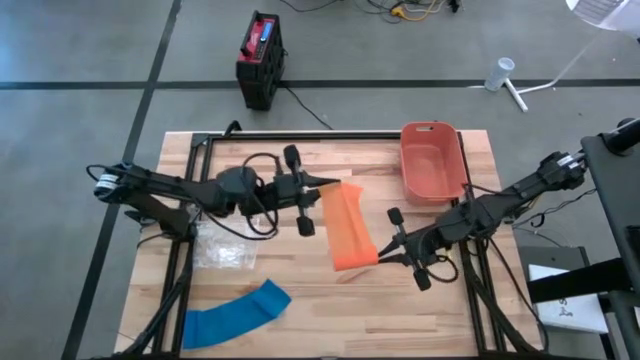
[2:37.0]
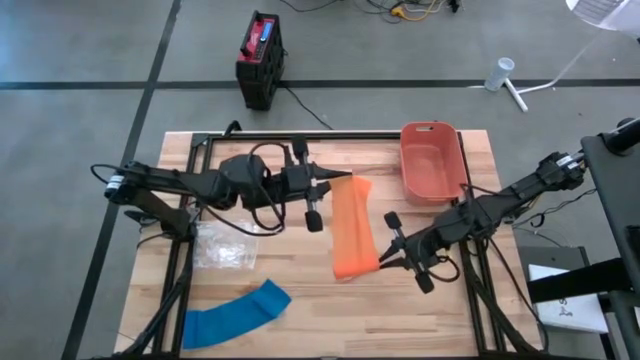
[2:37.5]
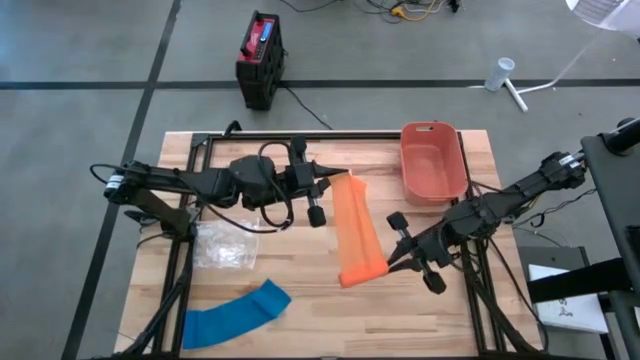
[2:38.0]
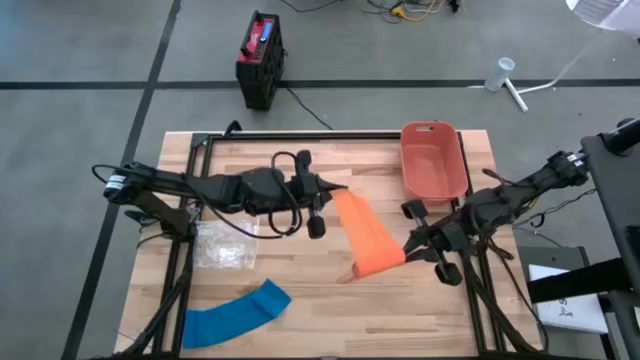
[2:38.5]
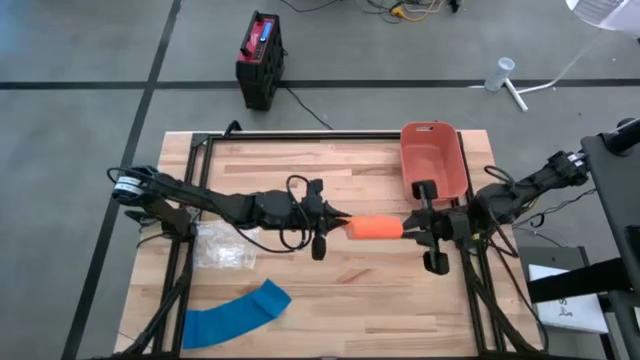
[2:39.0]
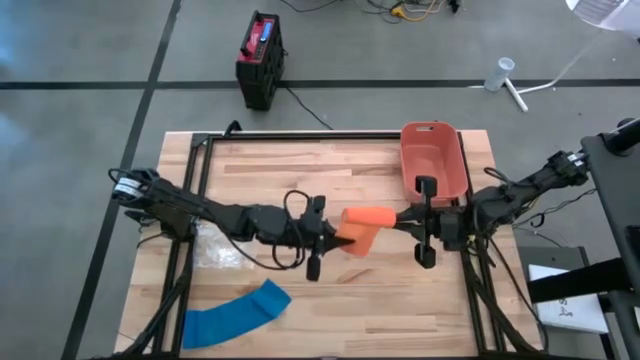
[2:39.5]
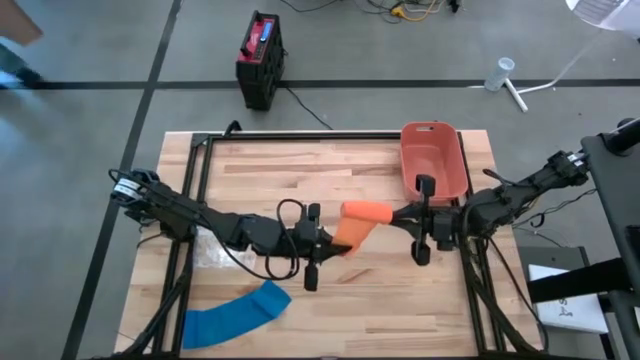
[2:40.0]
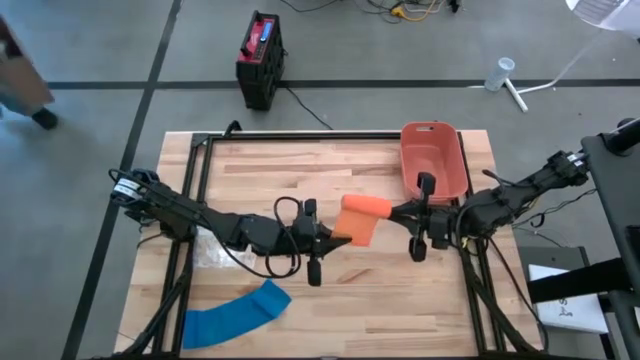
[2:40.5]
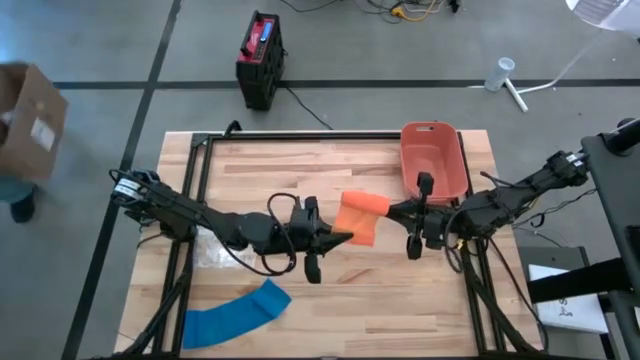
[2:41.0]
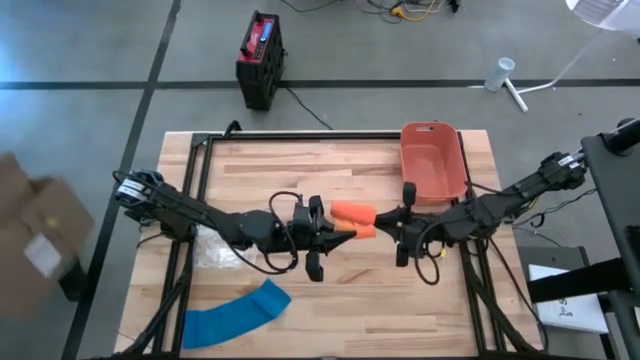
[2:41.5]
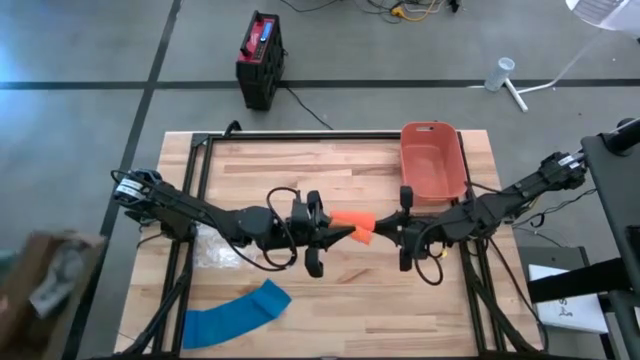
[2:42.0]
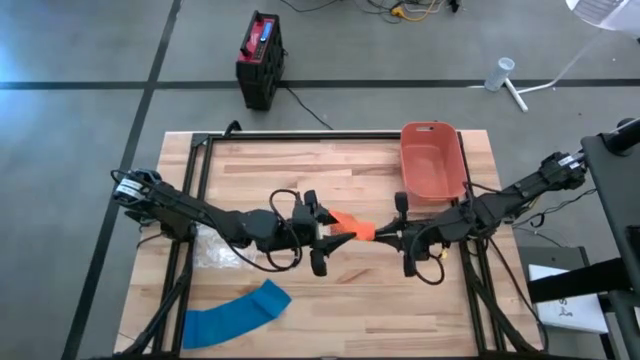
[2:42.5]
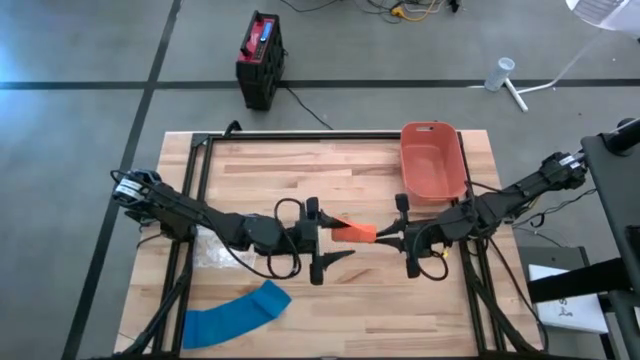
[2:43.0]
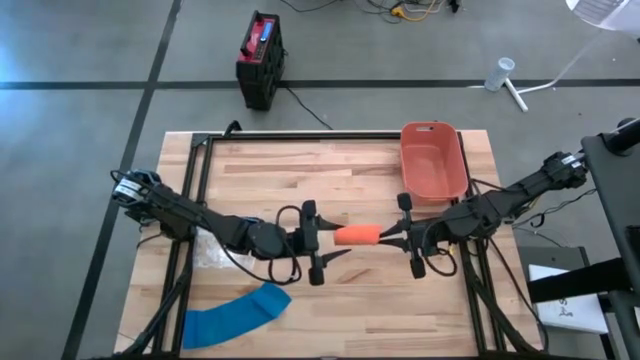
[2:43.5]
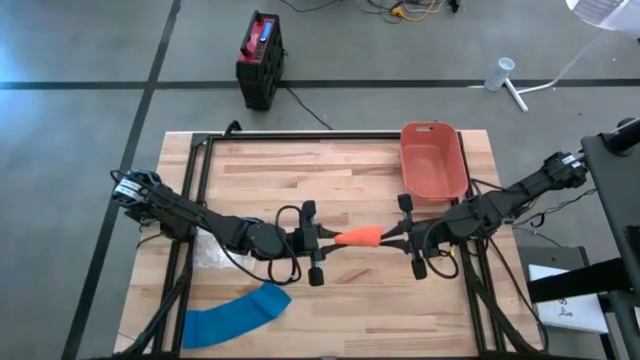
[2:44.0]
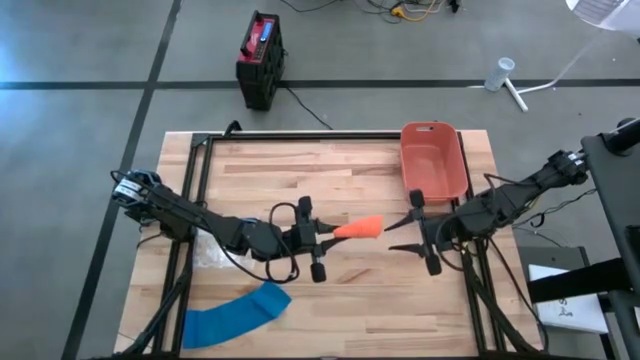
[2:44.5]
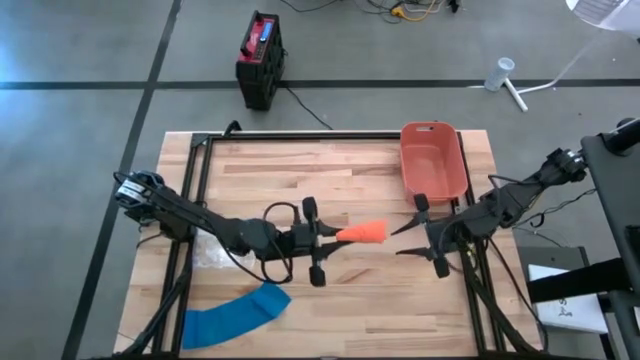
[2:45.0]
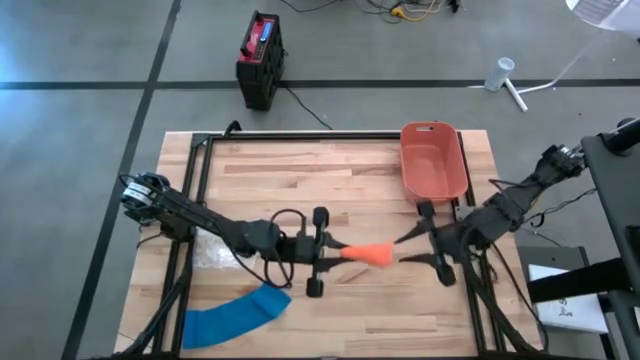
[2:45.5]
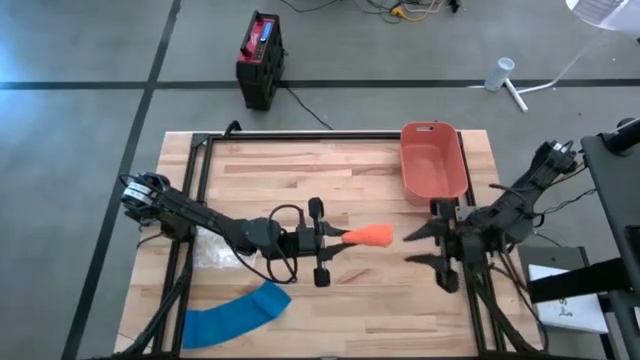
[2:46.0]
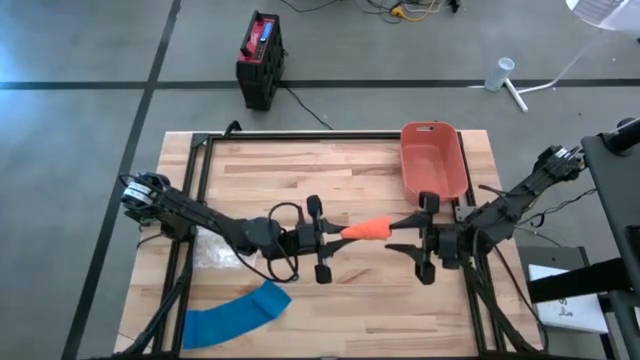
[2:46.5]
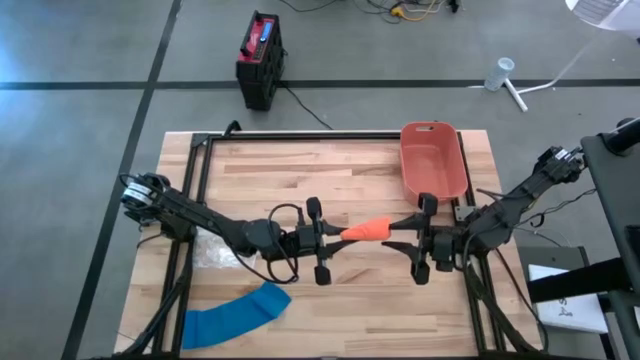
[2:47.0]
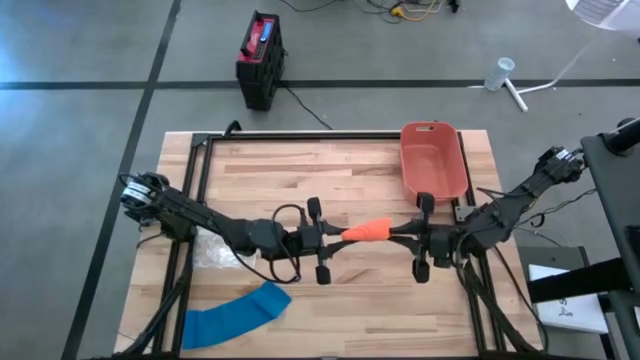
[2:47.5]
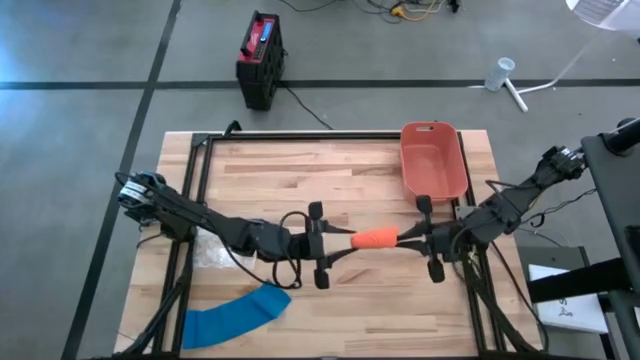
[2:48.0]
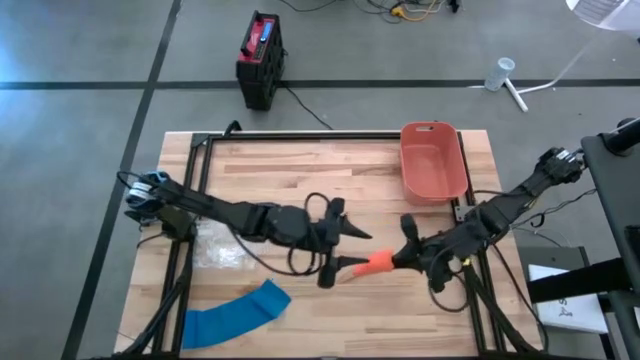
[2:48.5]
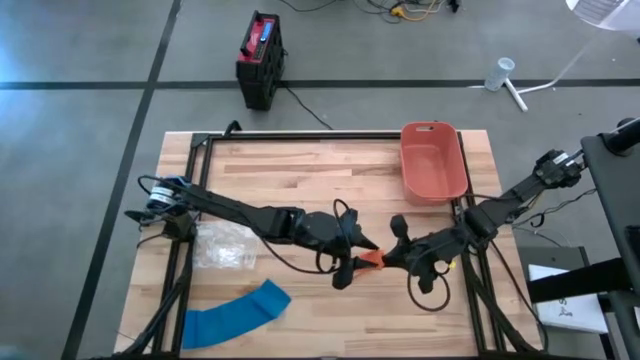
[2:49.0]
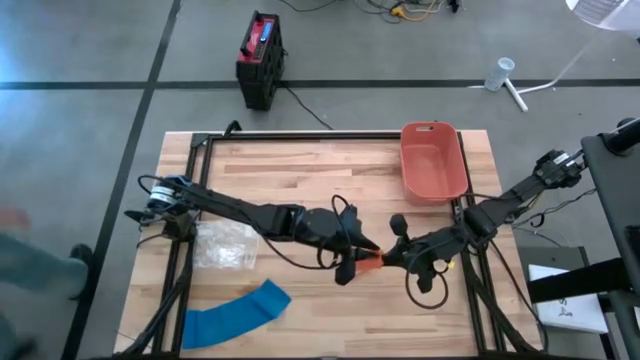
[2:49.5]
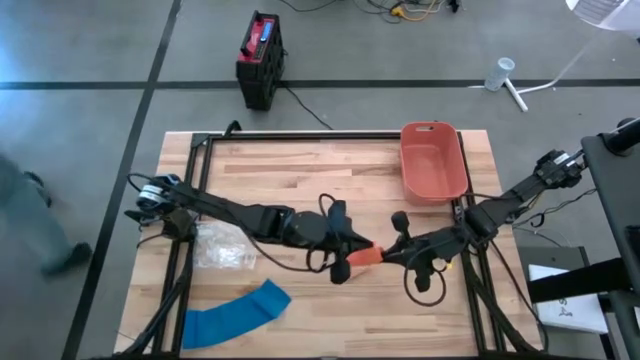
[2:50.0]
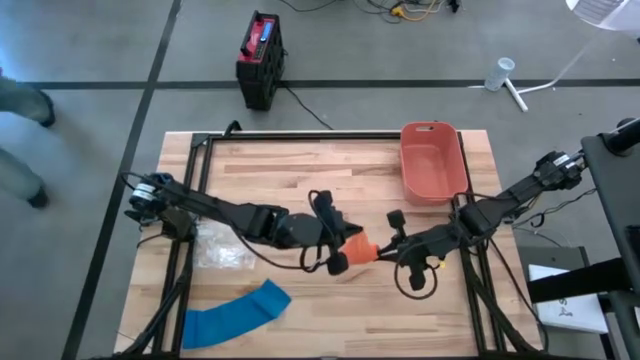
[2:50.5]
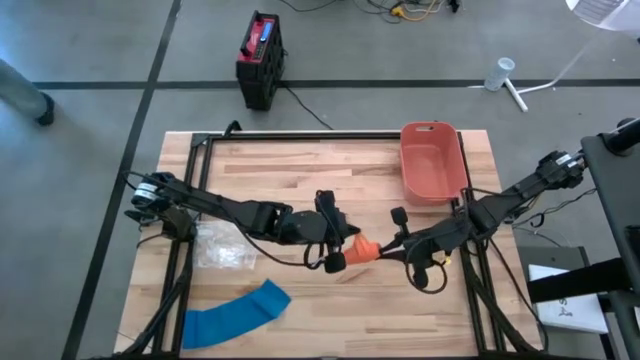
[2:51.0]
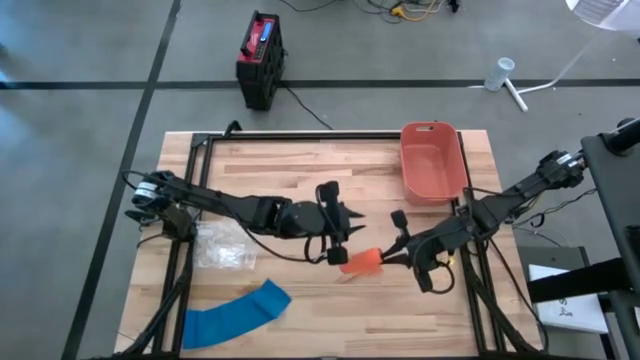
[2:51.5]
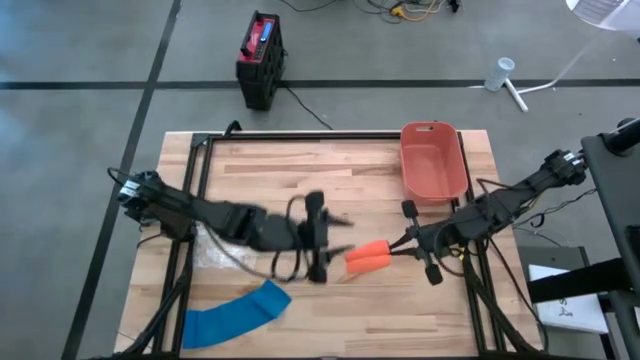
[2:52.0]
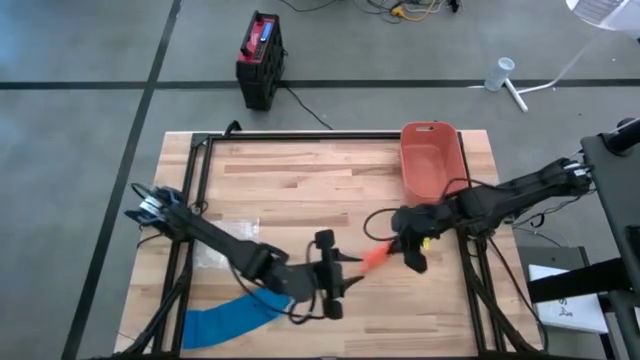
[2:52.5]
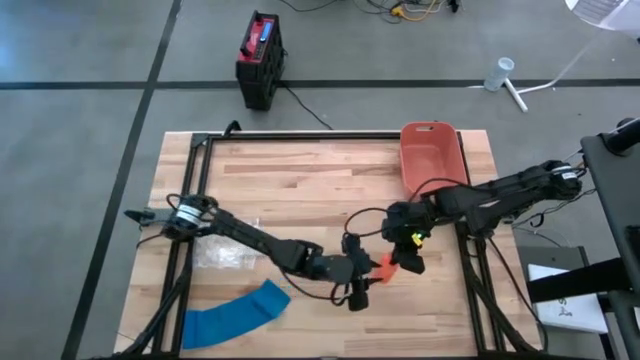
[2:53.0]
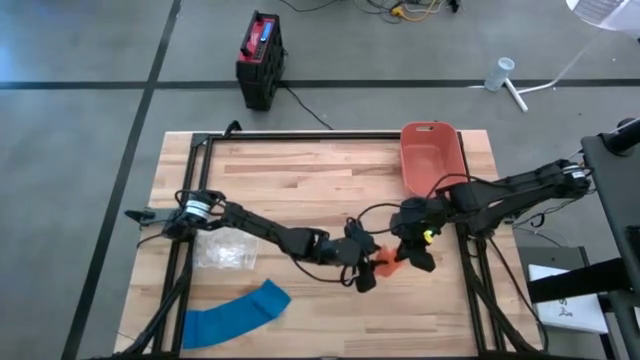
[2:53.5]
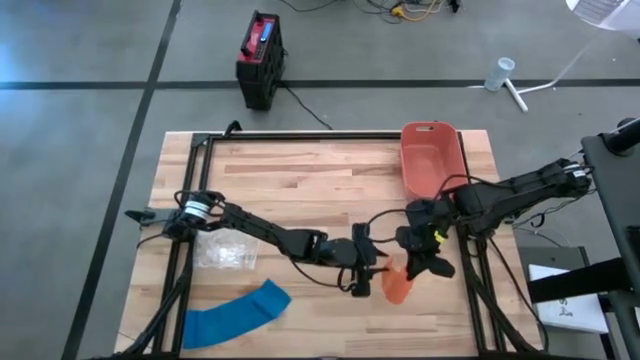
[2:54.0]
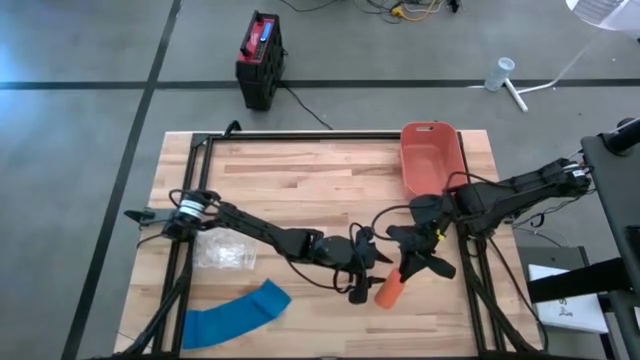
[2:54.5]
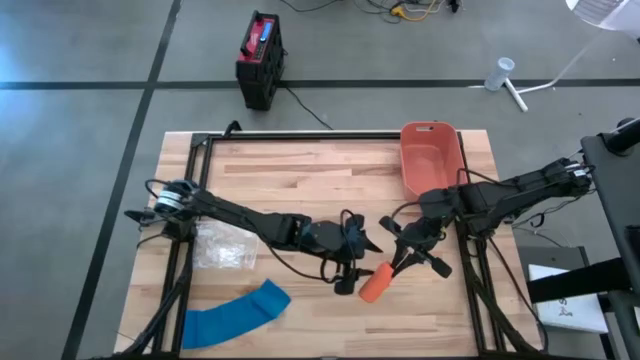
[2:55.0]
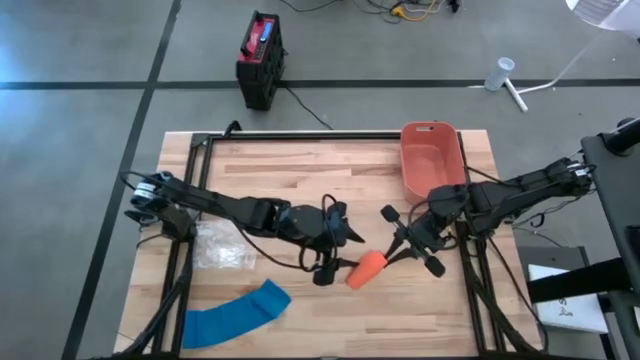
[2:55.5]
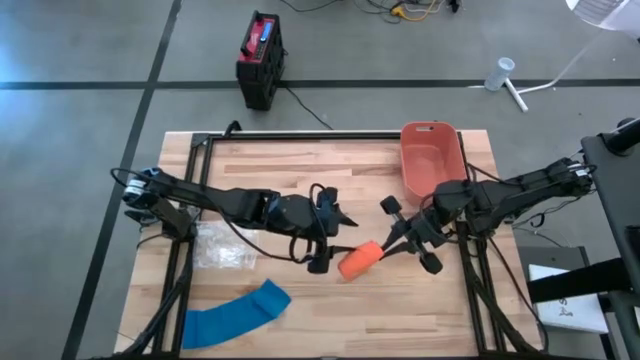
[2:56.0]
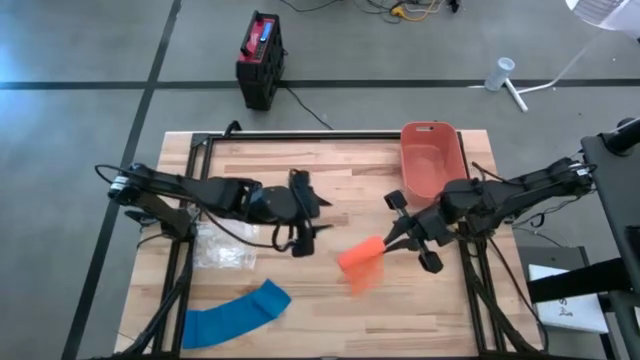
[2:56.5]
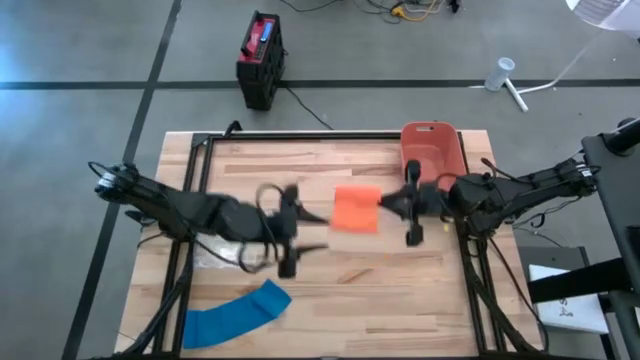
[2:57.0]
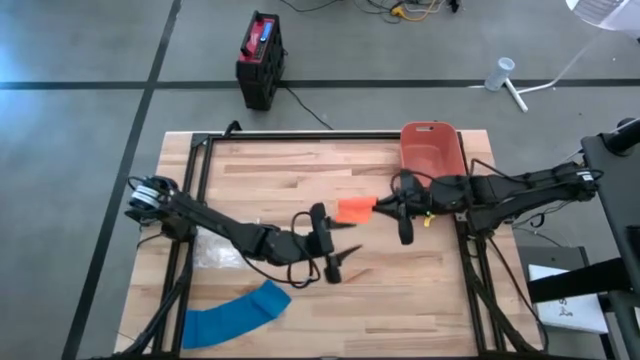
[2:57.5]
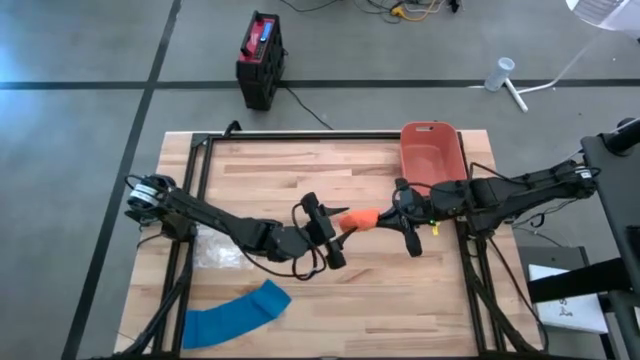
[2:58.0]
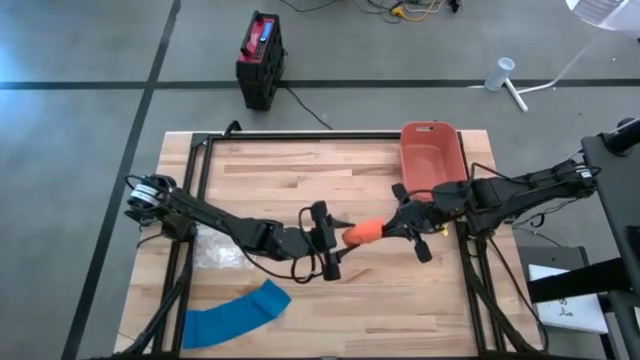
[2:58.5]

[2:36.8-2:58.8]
Task: Roll bandage
Roll the orange bandage
